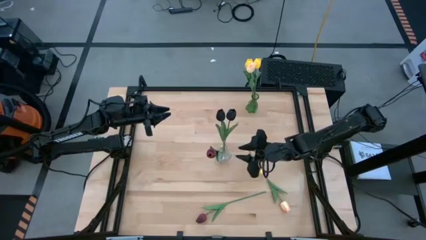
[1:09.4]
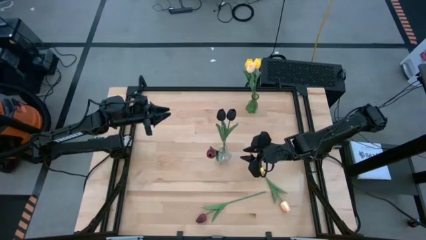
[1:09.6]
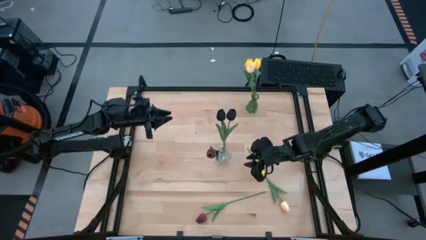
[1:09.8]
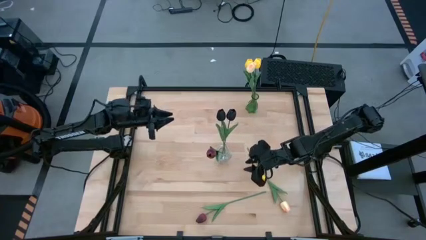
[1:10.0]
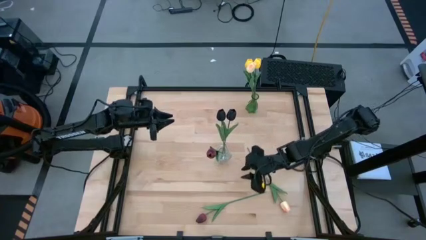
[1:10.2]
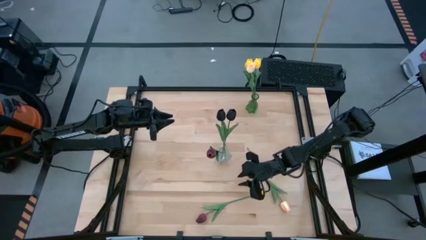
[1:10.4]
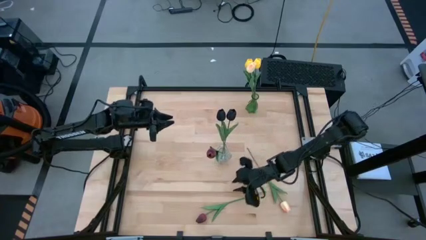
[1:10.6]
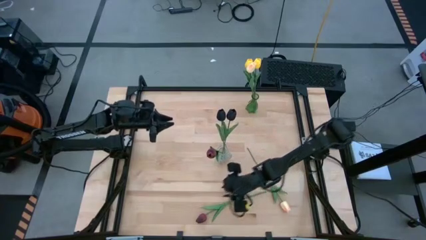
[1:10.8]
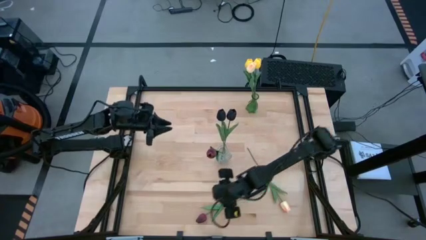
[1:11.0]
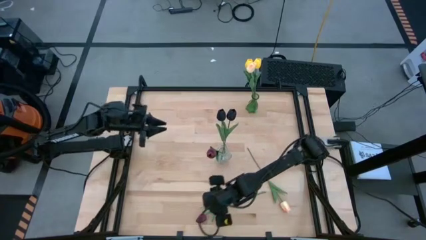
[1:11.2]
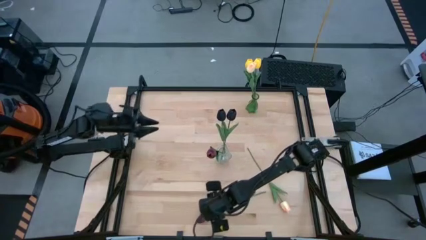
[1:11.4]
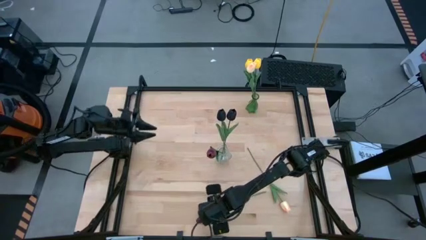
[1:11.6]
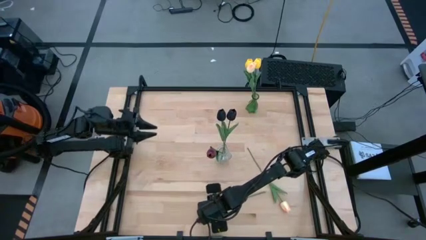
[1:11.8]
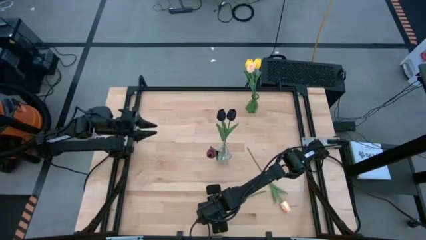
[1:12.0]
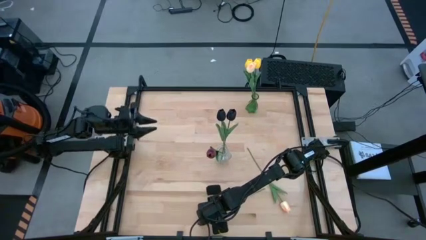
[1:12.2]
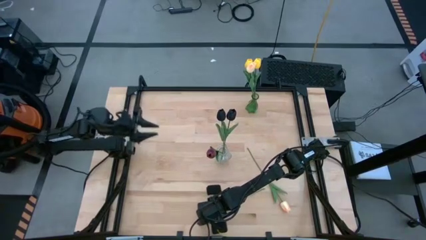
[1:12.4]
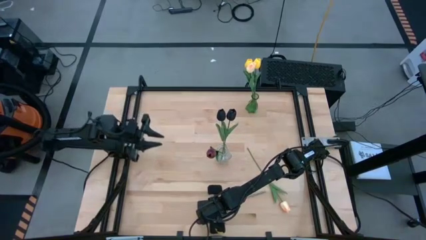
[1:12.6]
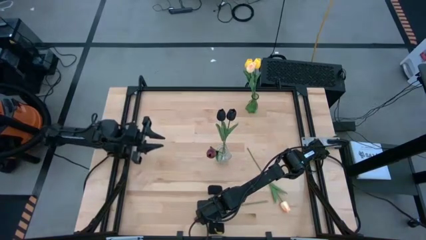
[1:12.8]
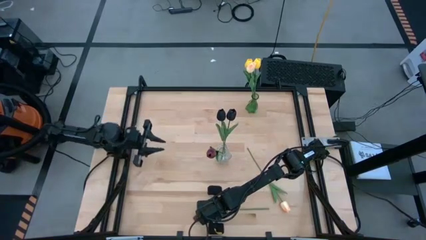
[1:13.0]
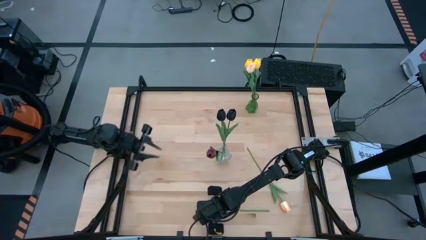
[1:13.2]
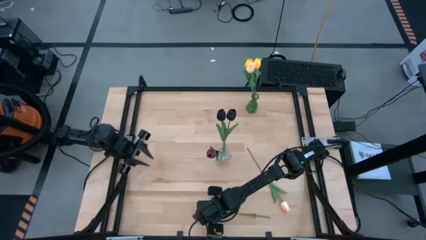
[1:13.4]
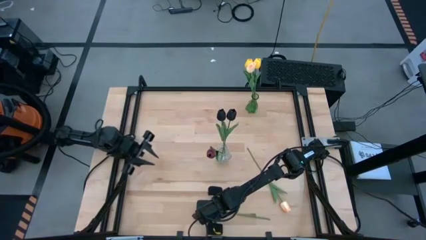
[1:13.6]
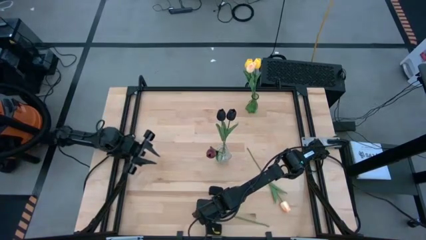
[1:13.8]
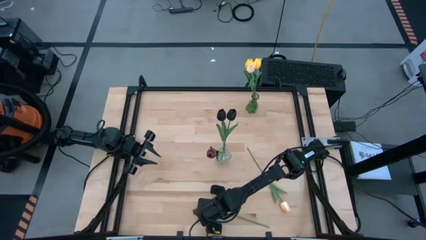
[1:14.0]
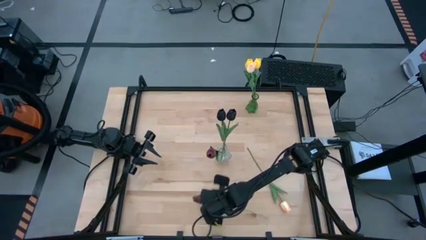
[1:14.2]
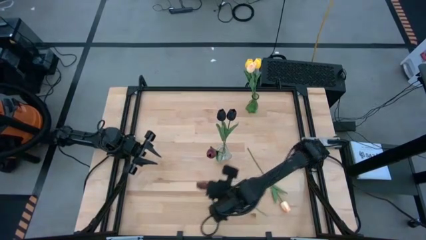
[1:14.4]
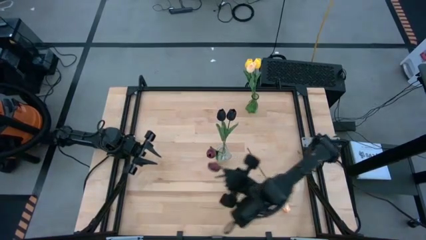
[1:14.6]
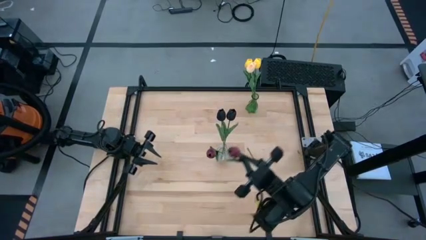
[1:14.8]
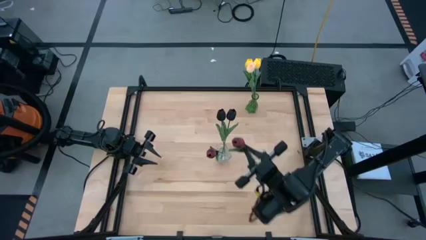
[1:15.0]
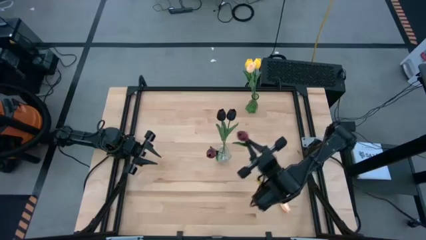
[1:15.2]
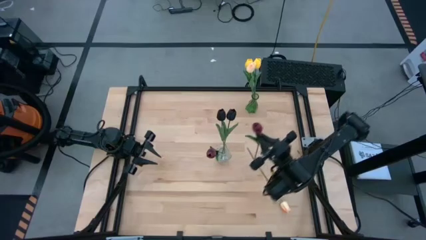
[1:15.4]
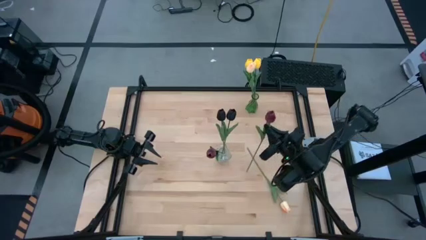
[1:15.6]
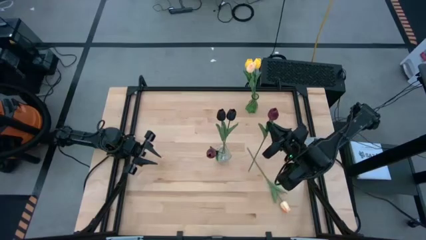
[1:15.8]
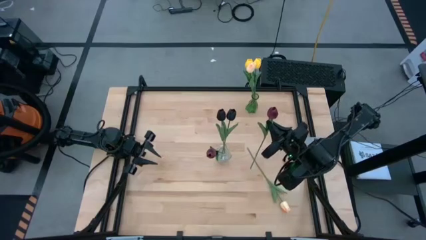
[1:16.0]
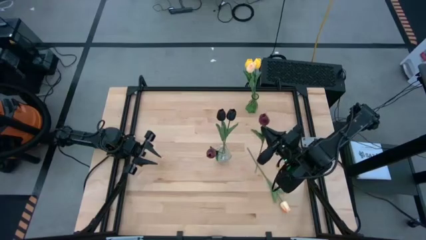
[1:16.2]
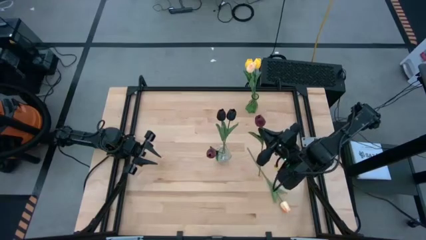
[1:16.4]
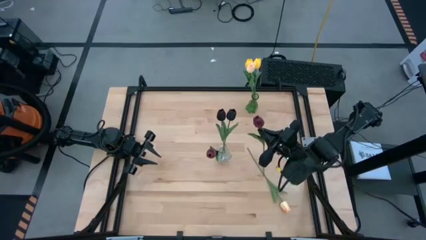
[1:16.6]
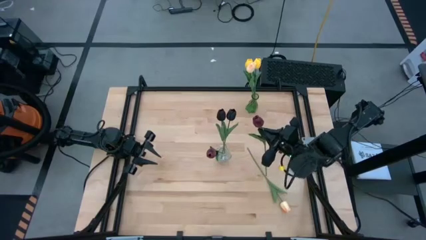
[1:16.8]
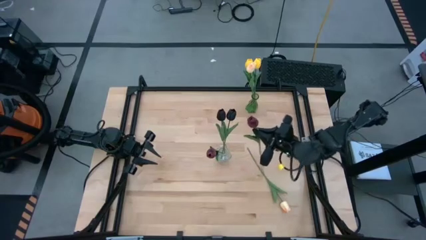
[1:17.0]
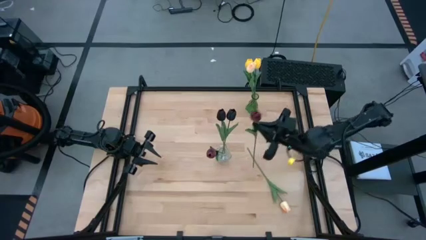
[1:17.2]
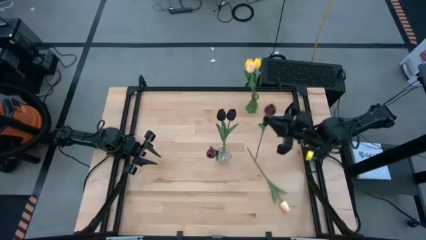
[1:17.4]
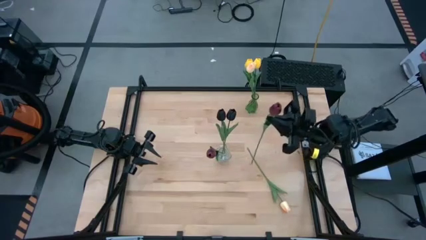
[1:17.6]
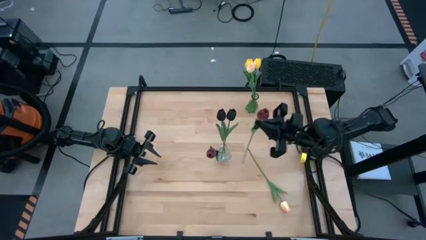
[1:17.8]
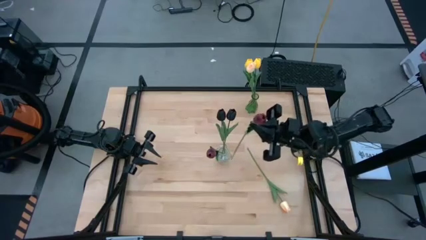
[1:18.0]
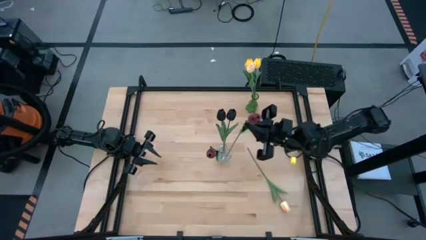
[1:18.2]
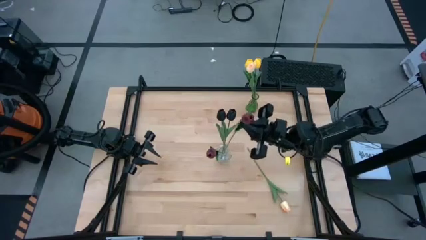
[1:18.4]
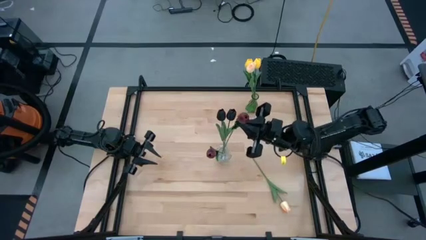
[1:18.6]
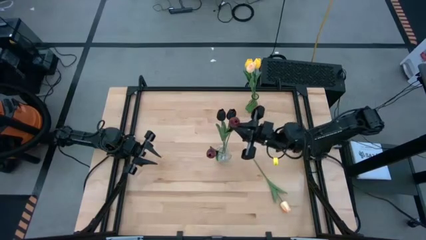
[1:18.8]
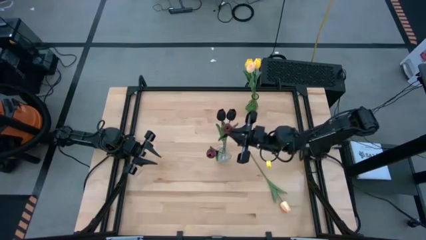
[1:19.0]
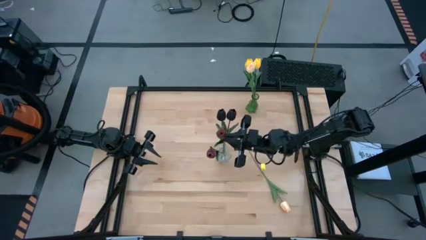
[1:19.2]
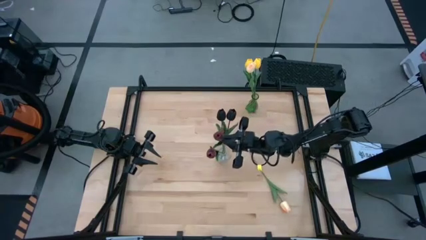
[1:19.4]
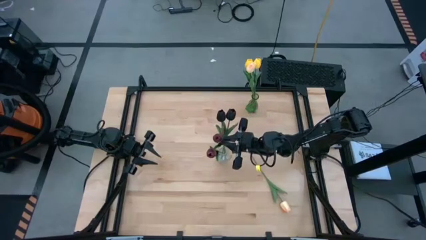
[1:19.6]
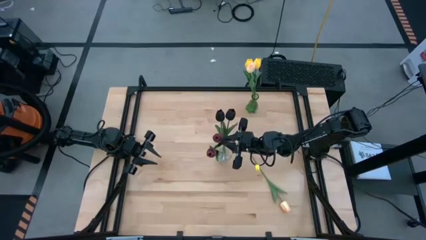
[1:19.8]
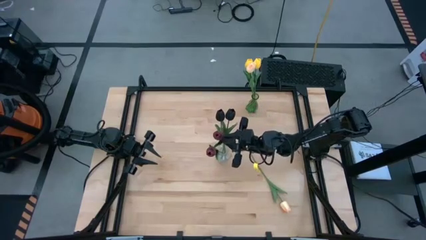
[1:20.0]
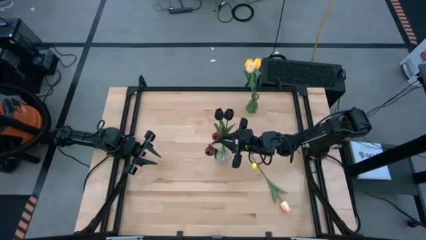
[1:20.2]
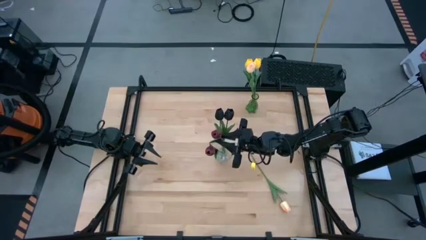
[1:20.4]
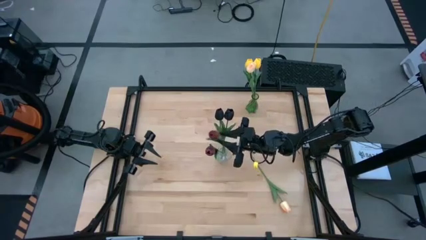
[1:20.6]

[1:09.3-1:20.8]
Task: Sort flowers into vase by color
Put the dark red tulip into the transparent vase

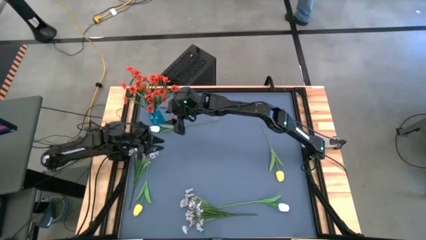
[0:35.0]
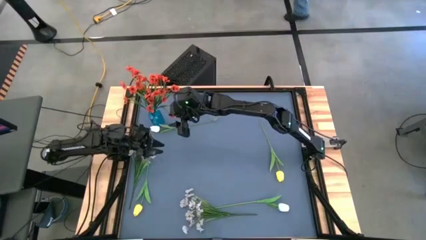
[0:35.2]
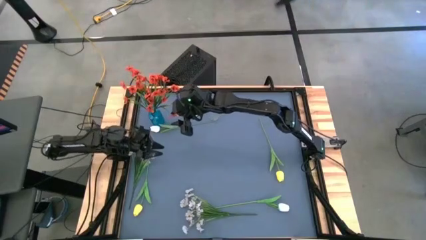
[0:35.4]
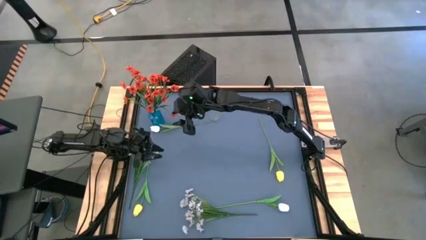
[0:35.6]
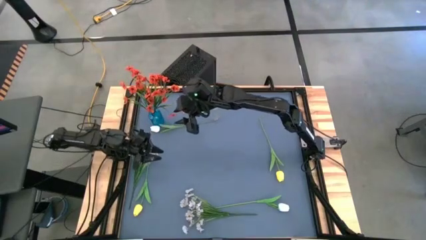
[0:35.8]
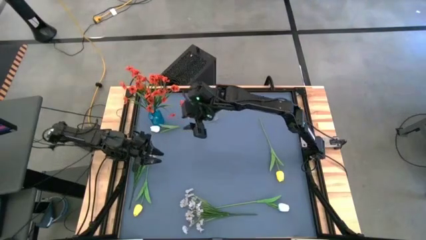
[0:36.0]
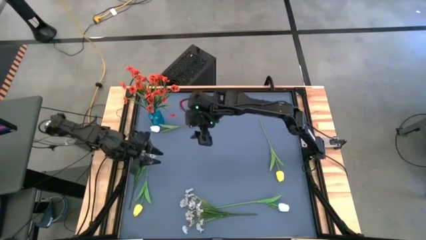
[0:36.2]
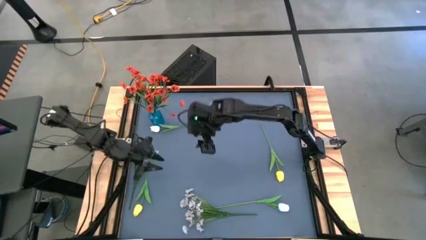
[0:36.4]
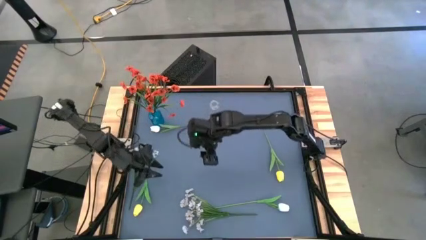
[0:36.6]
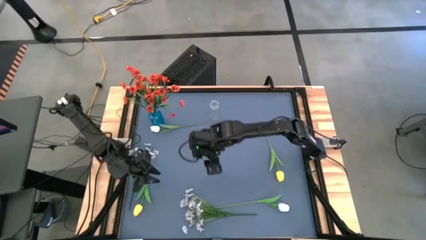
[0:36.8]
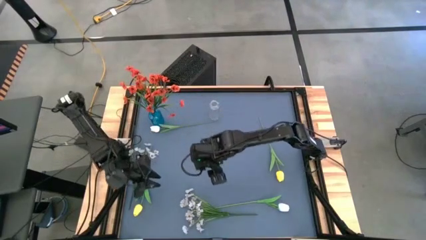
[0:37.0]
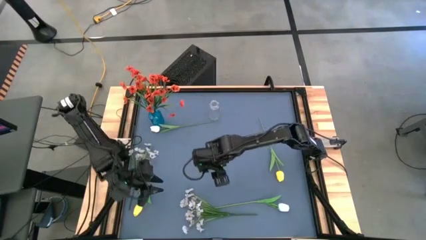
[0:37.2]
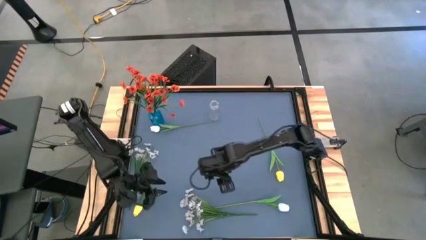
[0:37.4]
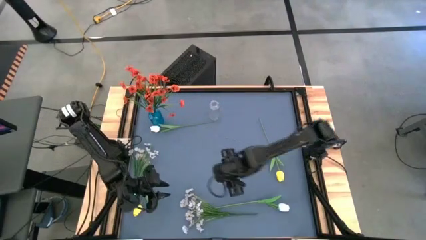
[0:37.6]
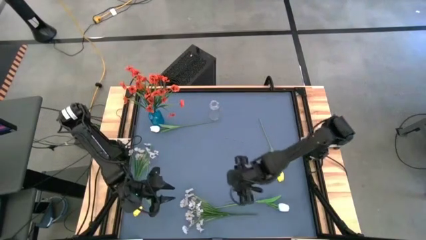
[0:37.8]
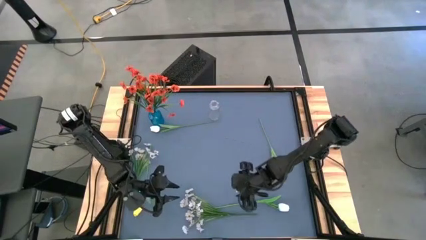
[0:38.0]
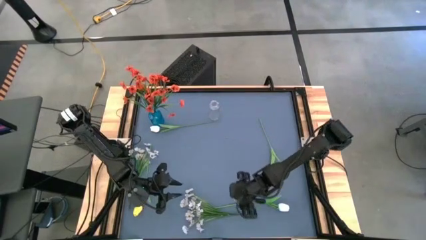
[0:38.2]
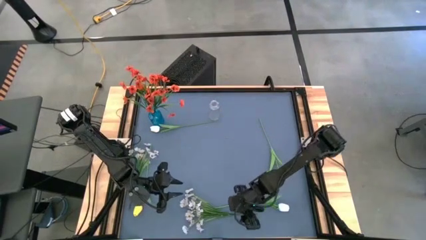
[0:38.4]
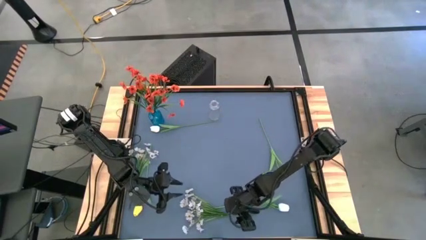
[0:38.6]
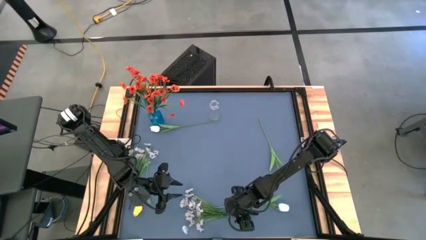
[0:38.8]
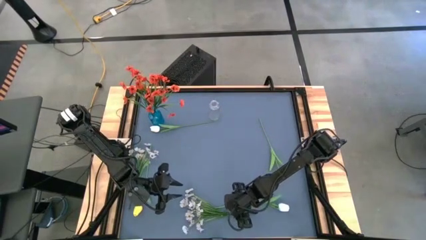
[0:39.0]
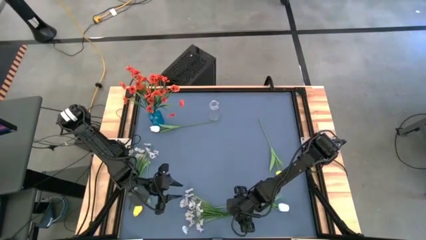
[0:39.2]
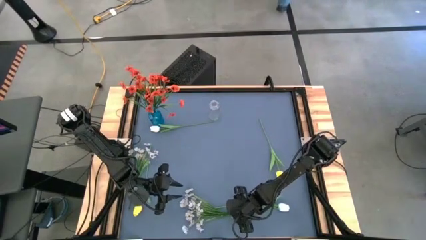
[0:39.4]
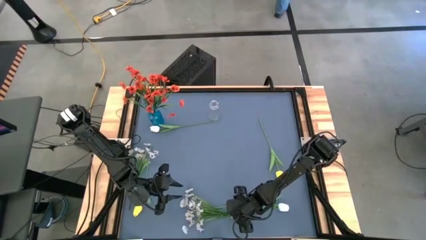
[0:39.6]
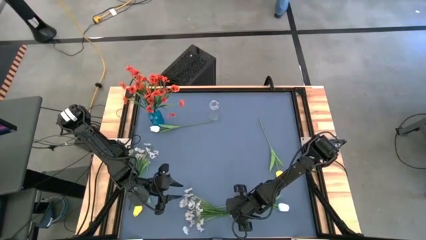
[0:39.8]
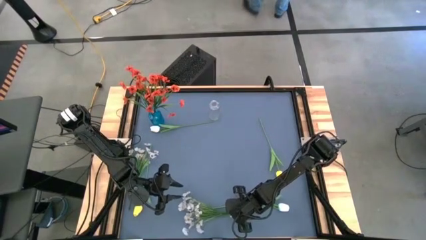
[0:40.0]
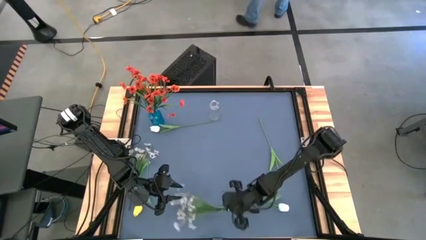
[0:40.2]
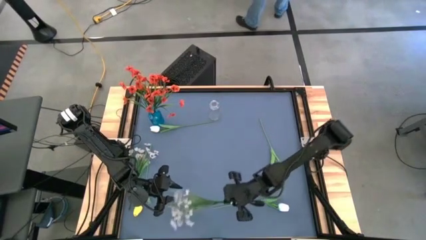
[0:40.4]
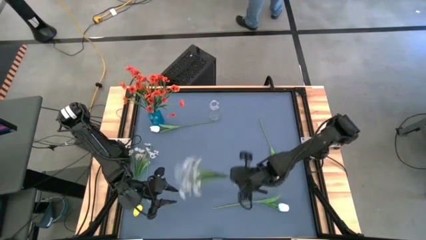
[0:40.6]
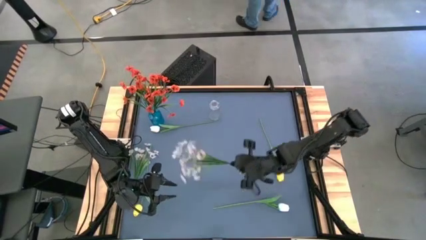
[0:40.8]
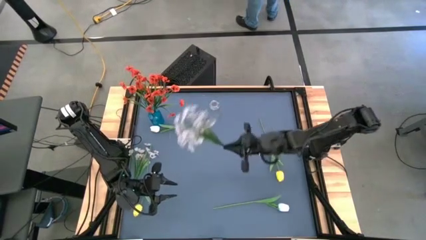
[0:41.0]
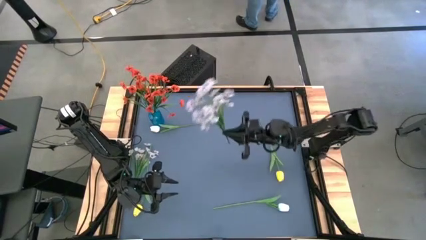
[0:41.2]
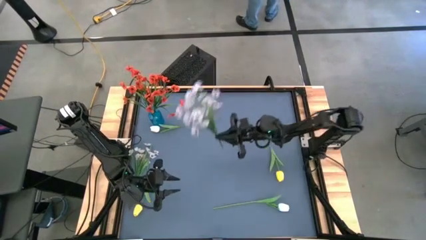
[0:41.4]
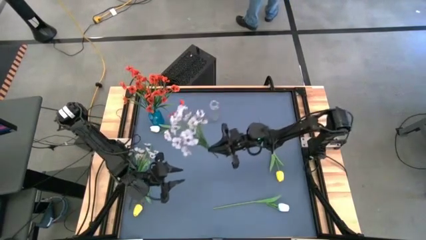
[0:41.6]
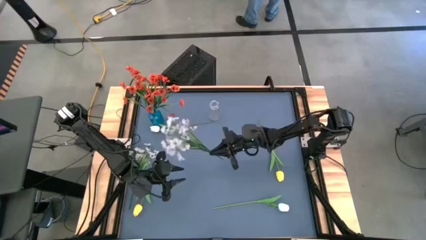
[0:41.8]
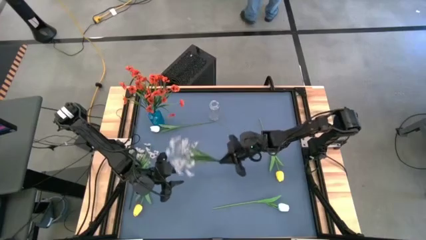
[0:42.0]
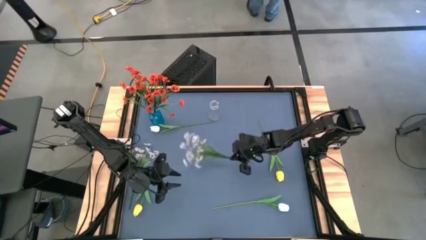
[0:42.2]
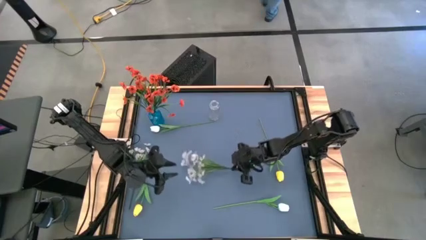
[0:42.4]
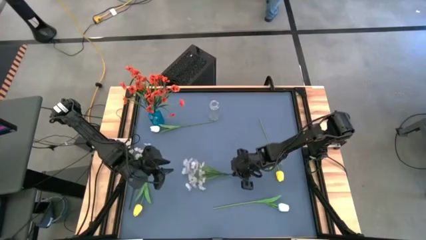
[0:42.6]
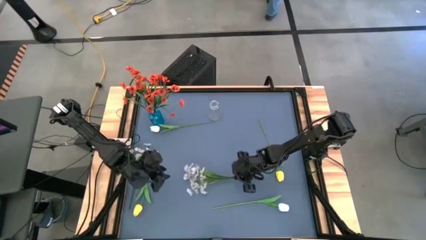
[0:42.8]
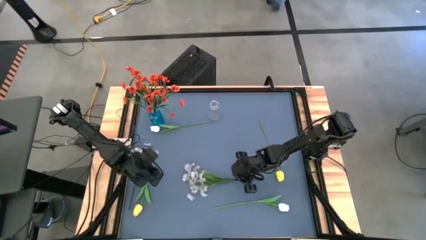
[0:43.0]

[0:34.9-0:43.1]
Task: Sort flowers into vase by color
Move the white flowers to the center of the table
